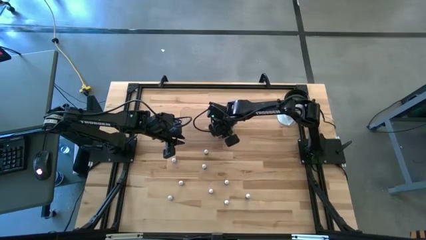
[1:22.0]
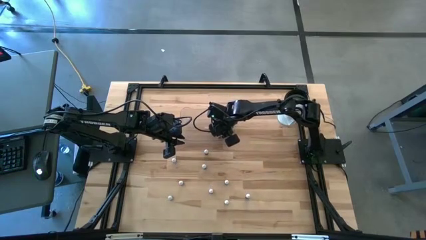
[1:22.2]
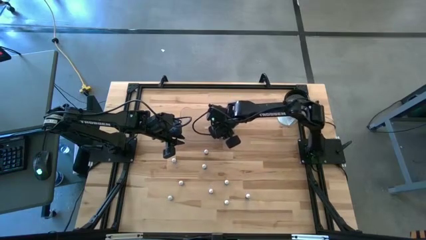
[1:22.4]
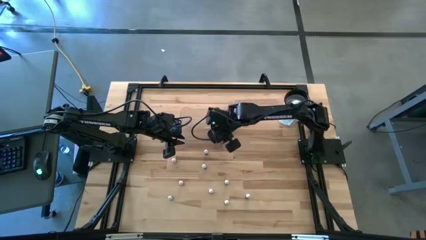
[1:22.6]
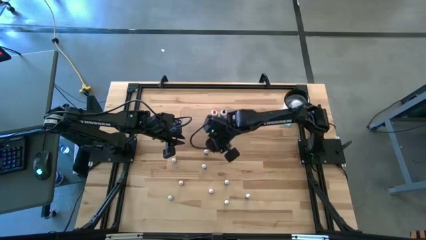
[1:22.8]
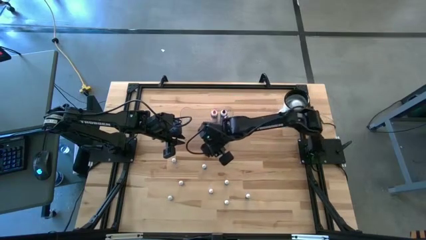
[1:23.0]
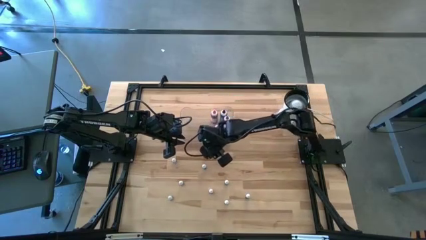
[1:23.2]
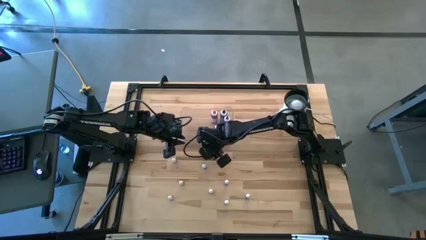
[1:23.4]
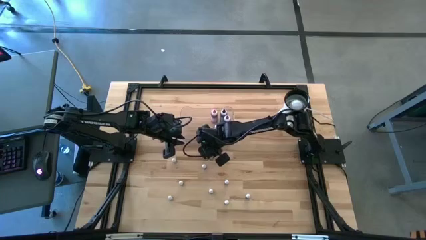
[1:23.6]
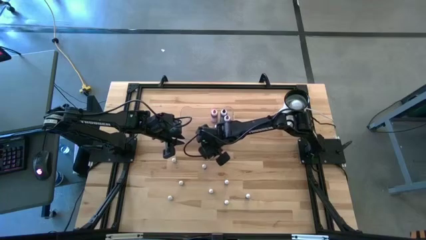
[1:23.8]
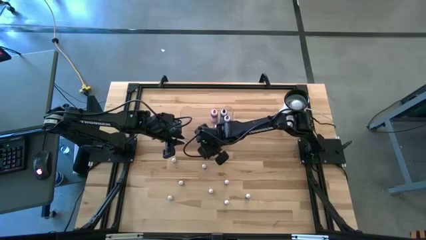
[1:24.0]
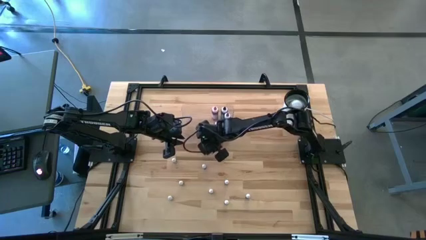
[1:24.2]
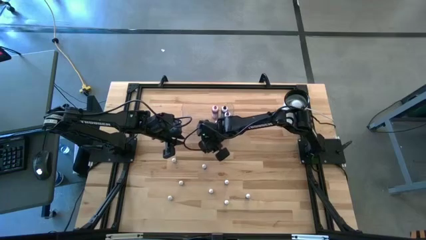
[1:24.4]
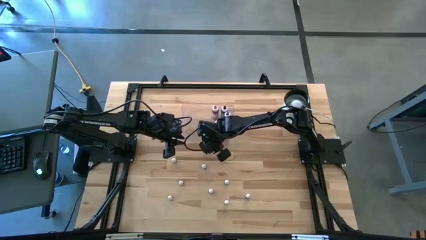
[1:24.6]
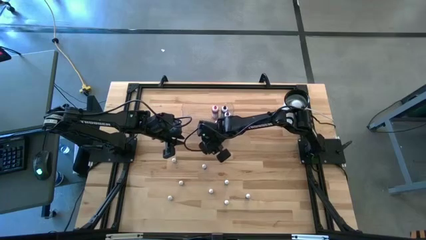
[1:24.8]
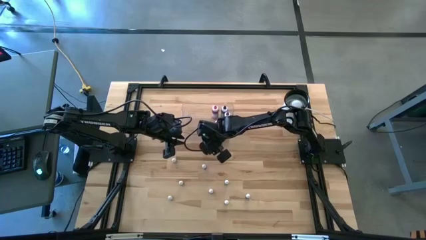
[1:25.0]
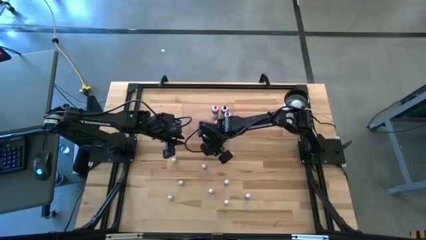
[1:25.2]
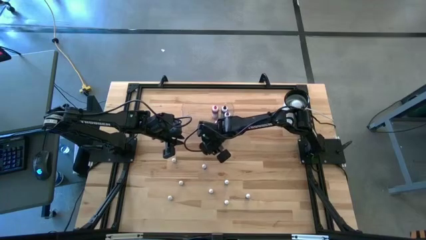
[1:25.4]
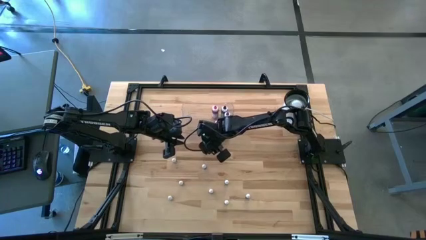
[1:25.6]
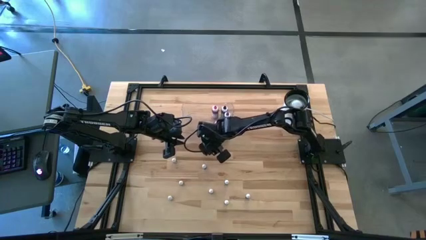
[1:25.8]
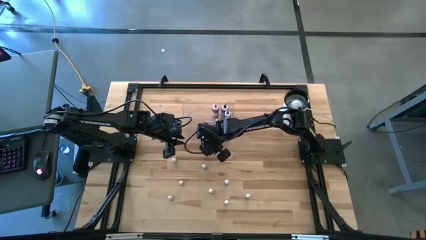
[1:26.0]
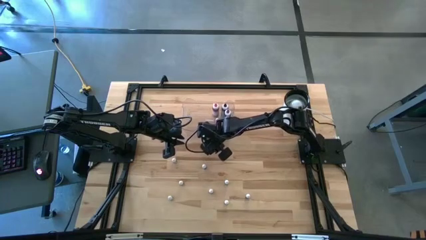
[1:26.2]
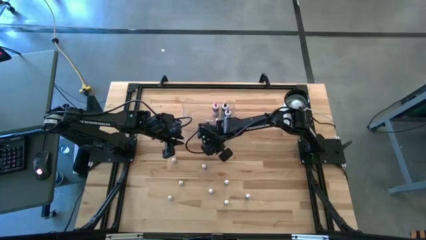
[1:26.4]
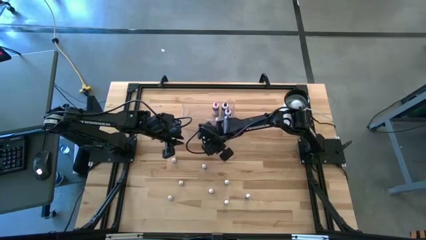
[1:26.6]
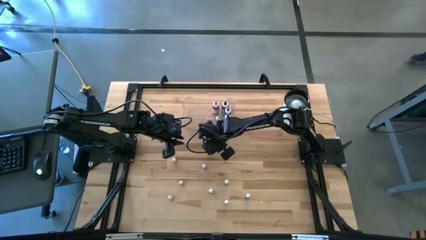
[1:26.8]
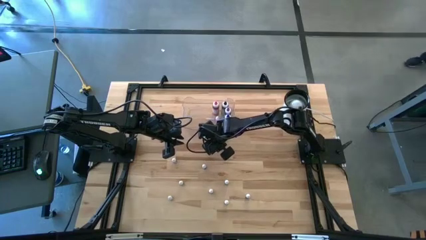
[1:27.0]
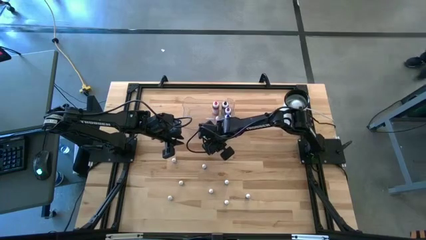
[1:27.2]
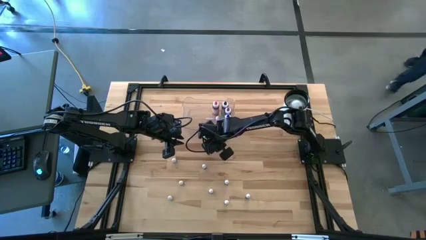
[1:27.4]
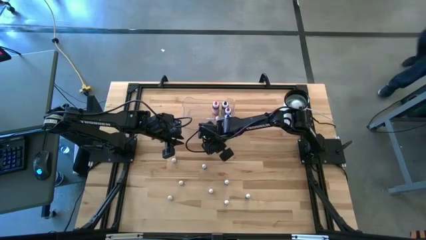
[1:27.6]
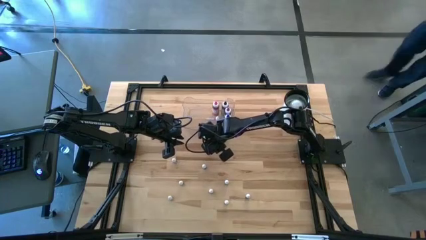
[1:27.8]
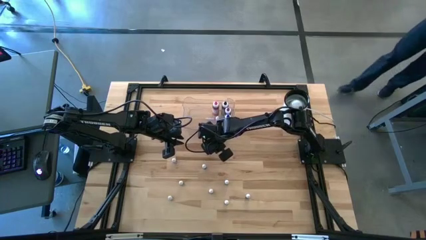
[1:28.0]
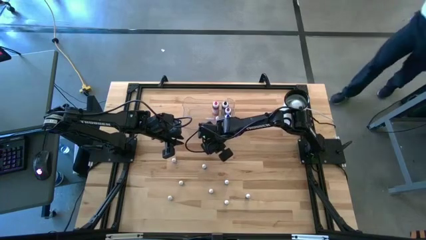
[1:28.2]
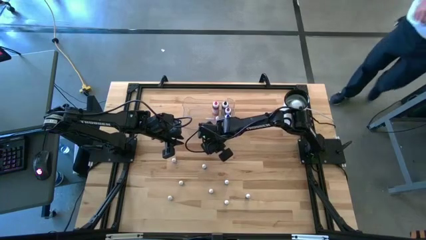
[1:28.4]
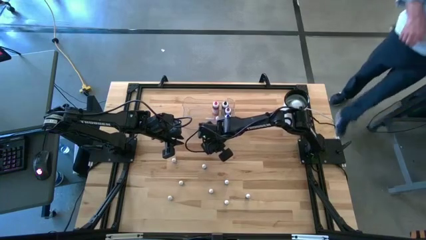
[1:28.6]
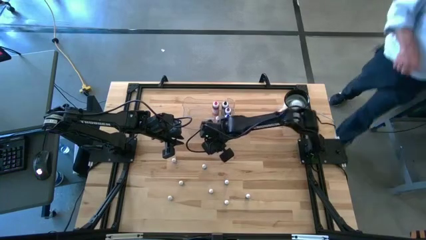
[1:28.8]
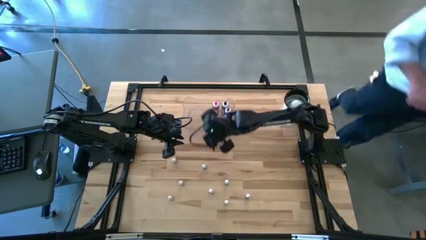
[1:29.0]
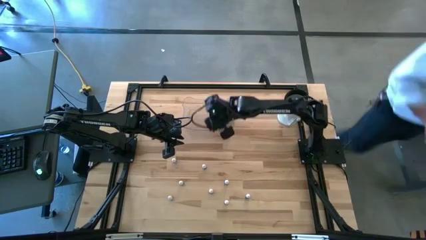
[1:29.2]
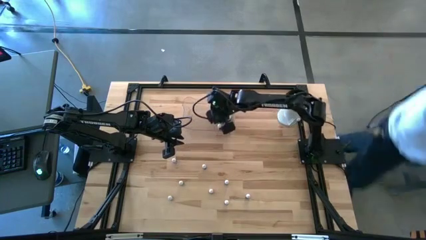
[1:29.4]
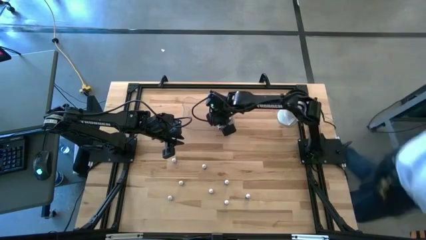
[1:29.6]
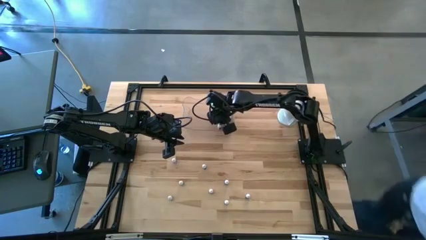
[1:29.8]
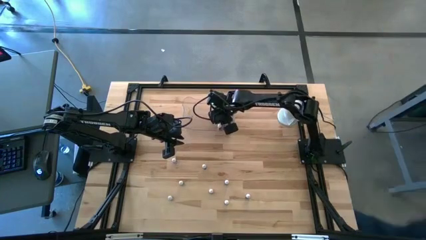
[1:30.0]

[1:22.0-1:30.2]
Task: Pick & Place food coloring
Put the small blue food coloring bottle into the transparent bin

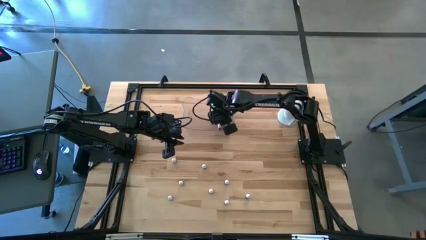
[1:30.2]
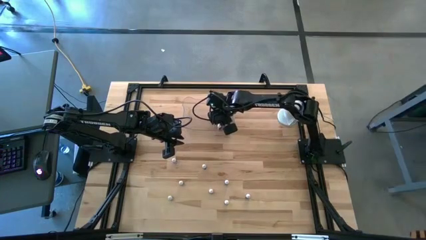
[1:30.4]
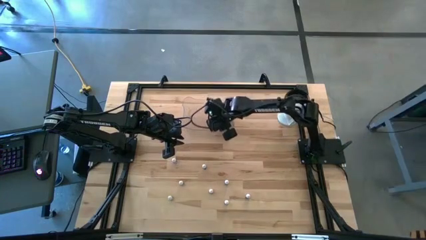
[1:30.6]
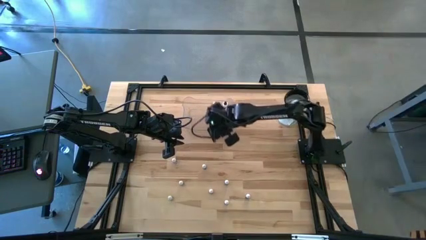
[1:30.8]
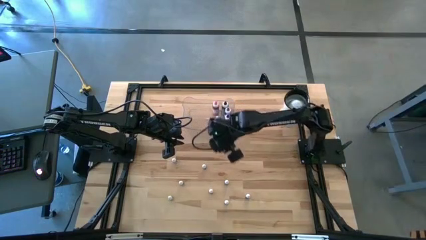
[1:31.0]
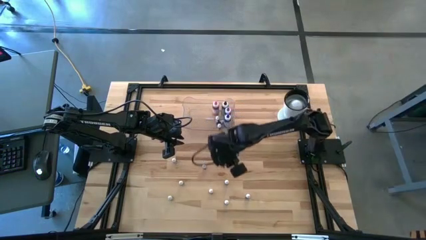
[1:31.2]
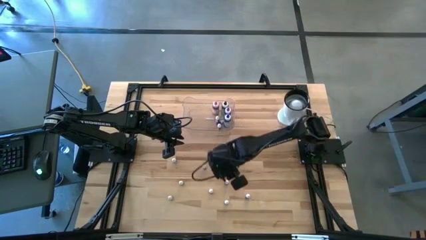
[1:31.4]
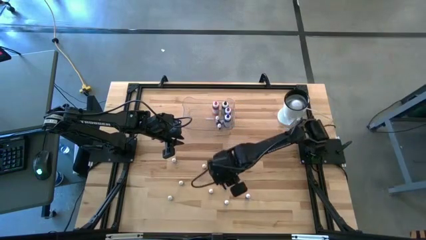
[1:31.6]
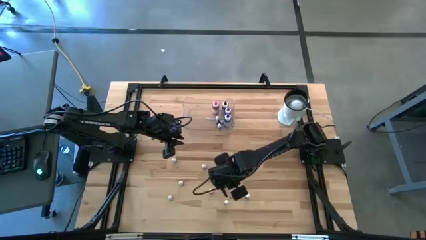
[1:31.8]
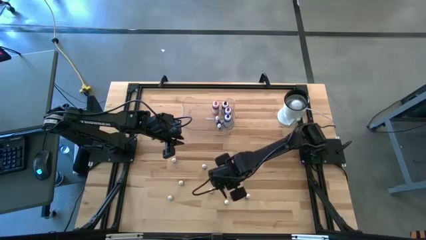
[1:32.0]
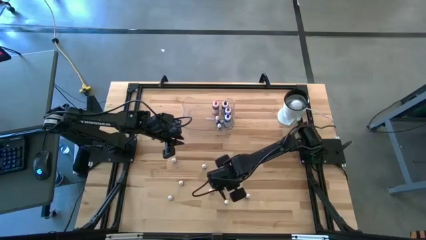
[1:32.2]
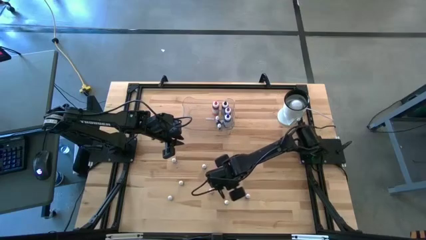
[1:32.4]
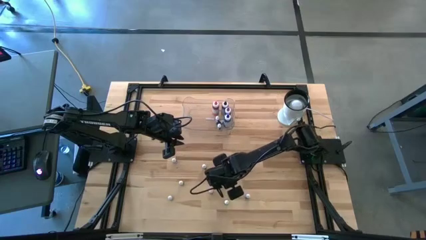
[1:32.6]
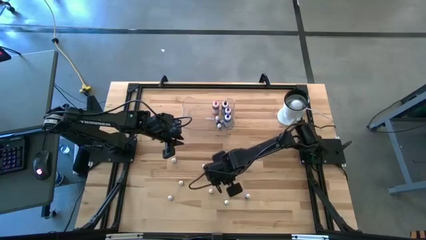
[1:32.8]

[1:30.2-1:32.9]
Put the small green food coloring bottle into the transparent bin

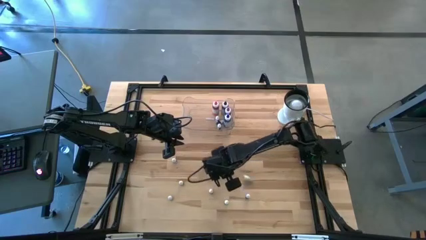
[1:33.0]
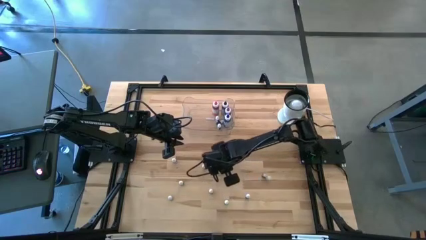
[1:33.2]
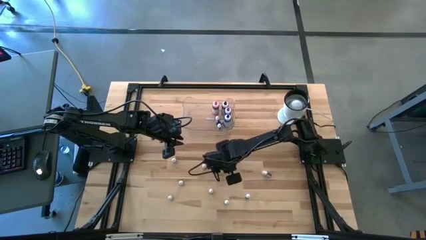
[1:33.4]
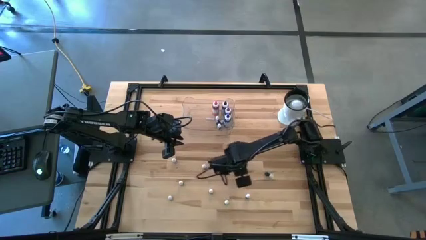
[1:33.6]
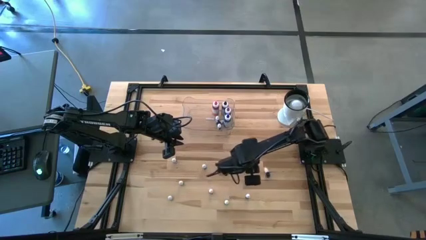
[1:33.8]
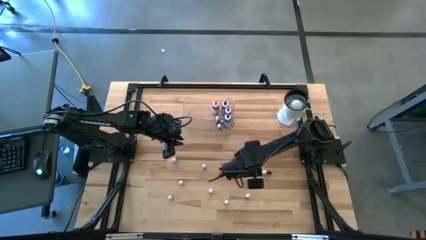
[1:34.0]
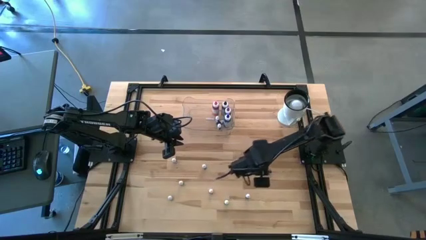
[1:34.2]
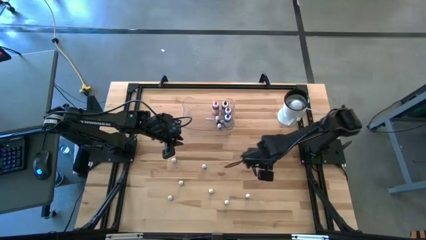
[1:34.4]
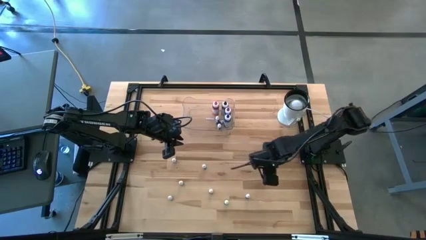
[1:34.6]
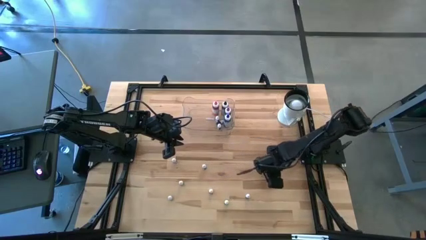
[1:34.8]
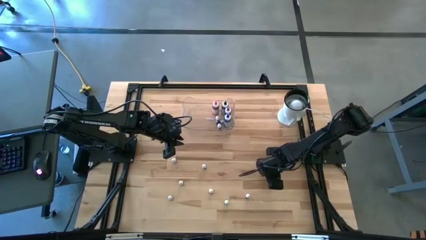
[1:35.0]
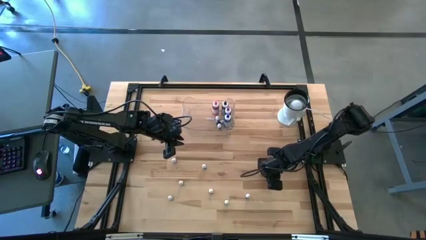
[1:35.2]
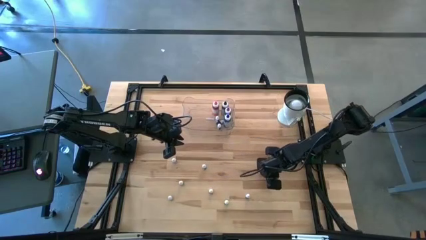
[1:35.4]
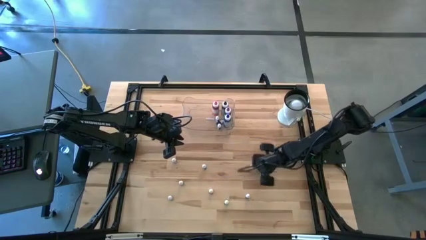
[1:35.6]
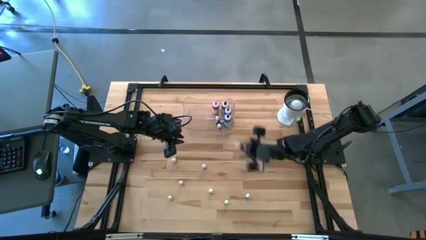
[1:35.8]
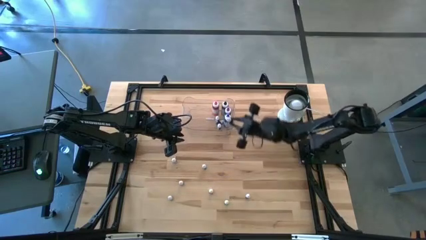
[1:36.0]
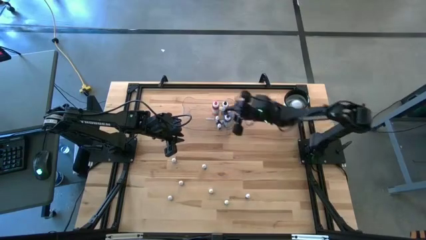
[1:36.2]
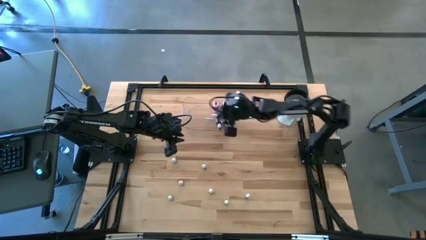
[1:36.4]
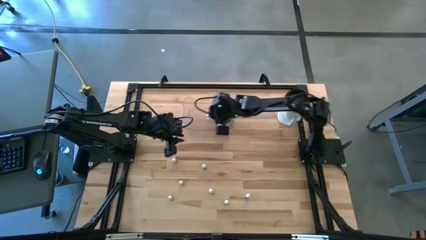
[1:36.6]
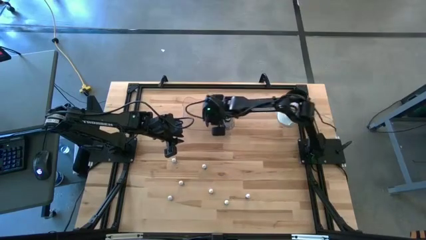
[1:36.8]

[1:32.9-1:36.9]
Put the small green food coloring bottle into the transparent bin

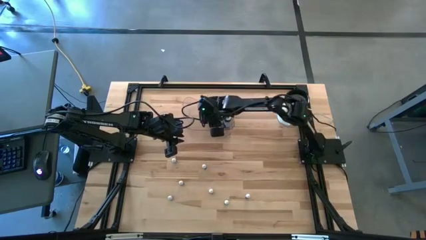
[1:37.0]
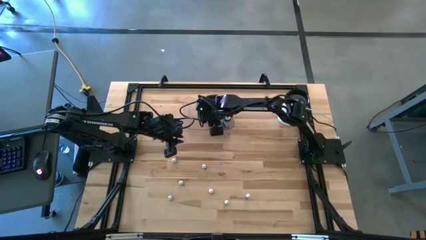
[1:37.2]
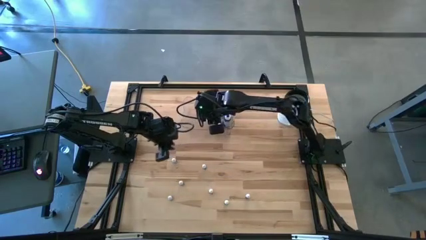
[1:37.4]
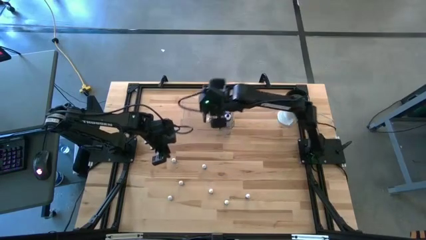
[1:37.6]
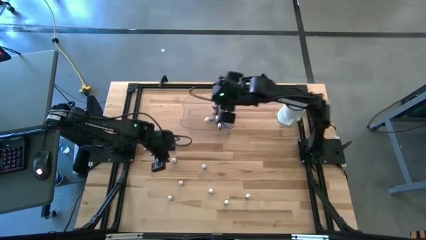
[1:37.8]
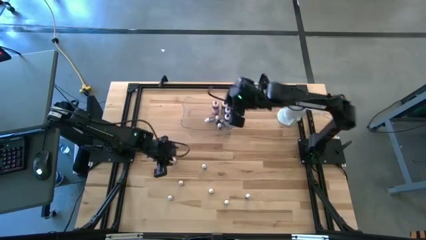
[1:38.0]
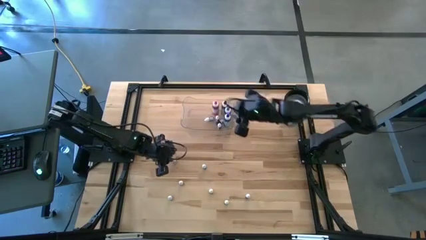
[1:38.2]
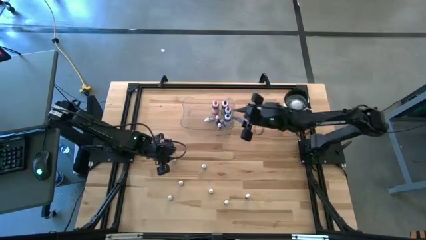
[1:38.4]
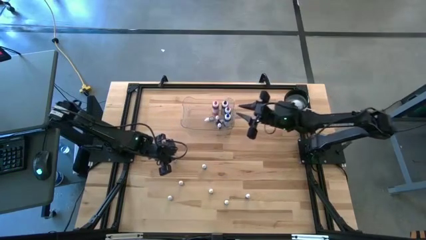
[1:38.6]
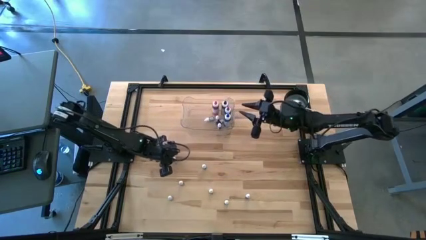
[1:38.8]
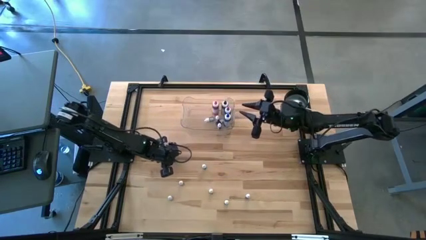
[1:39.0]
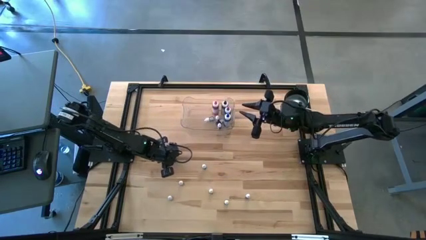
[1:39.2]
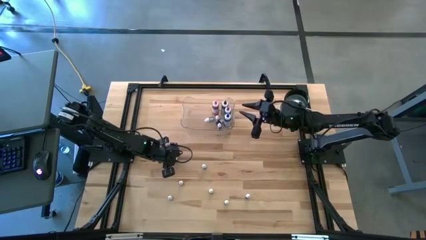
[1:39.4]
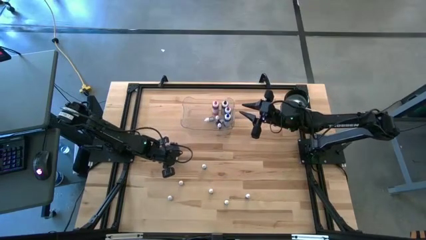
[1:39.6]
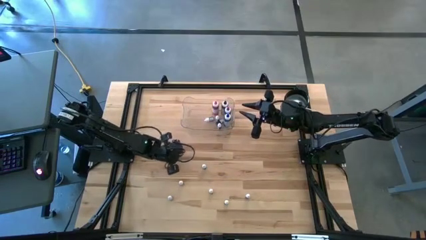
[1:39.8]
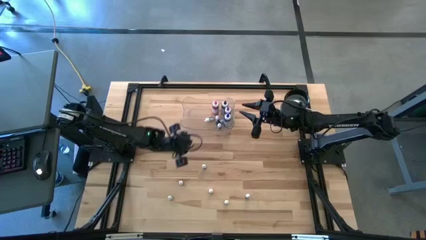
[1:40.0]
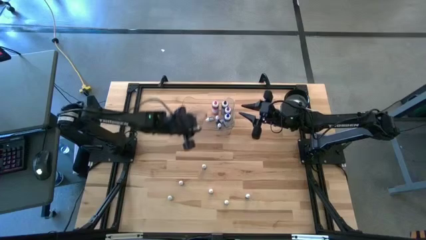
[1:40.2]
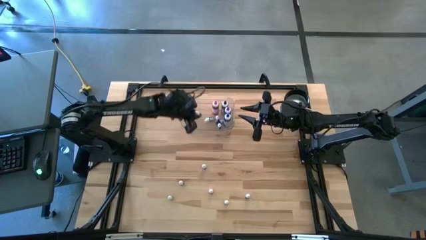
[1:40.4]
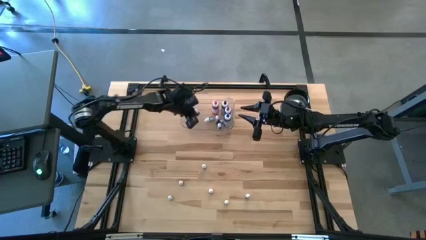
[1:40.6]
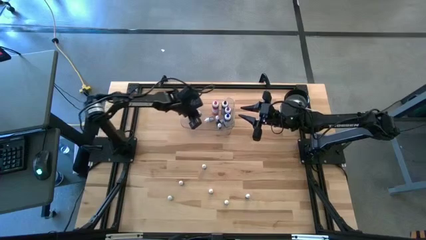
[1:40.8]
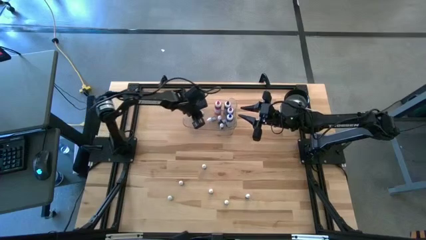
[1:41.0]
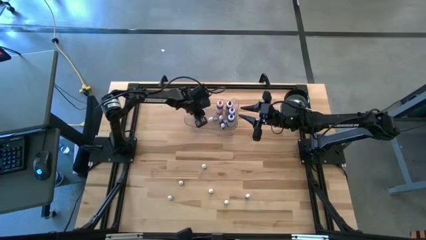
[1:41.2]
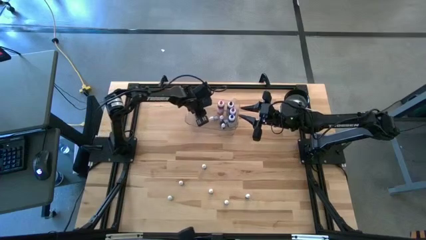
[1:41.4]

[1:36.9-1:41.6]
Put the small black food coloring bottle into the transparent bin
